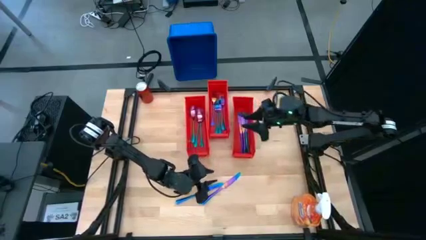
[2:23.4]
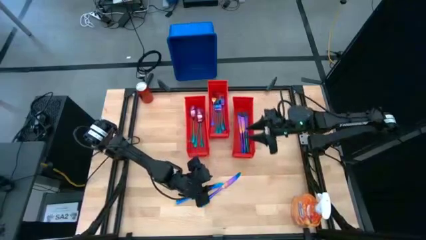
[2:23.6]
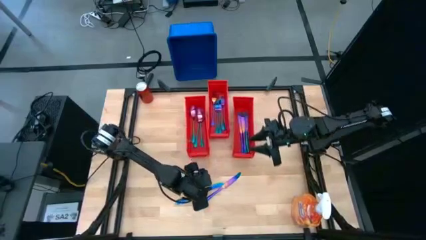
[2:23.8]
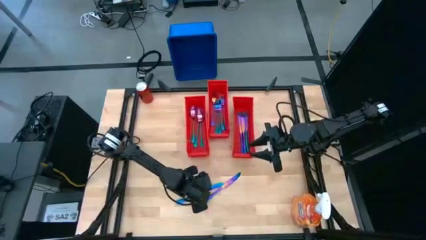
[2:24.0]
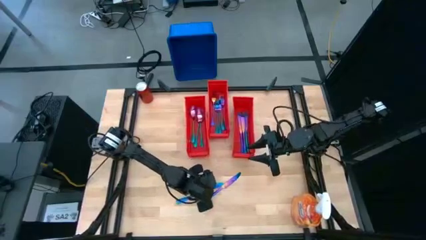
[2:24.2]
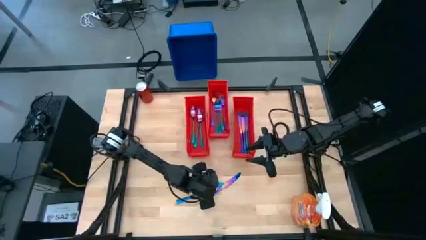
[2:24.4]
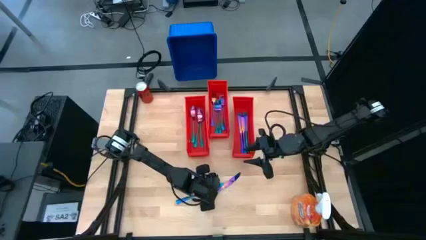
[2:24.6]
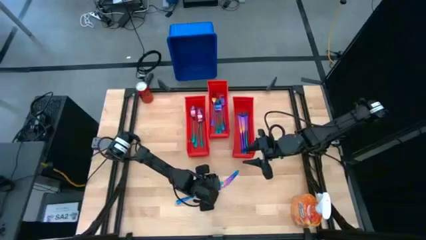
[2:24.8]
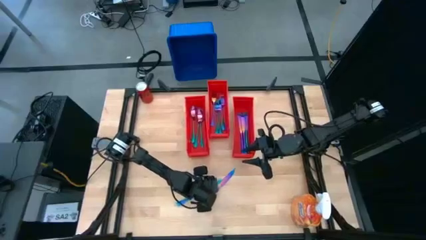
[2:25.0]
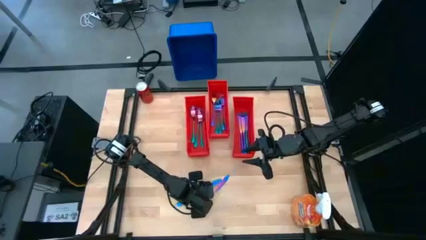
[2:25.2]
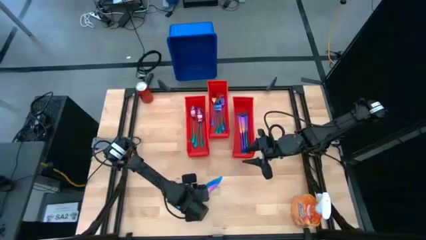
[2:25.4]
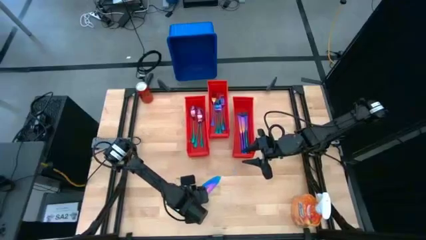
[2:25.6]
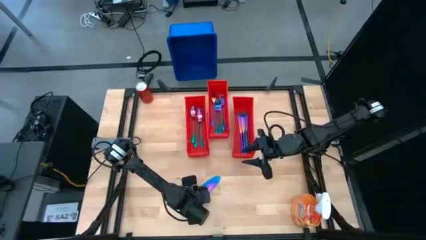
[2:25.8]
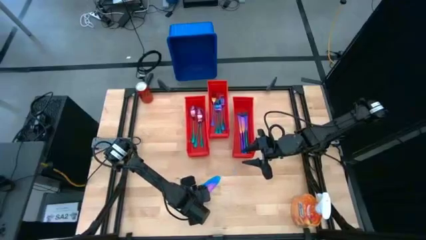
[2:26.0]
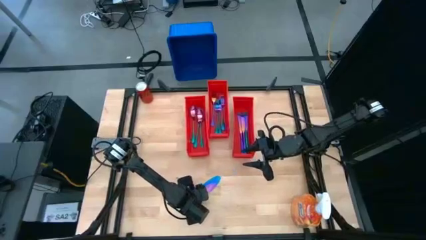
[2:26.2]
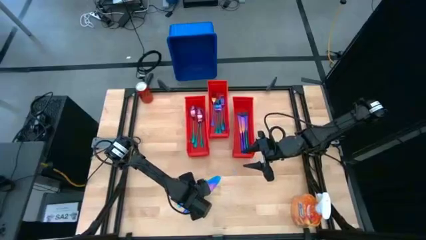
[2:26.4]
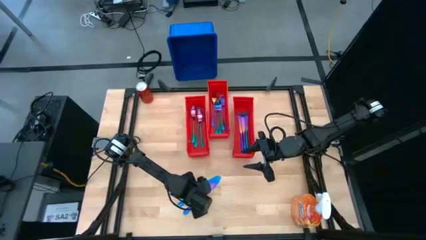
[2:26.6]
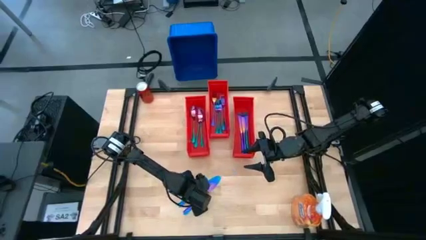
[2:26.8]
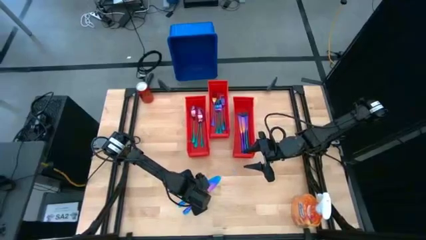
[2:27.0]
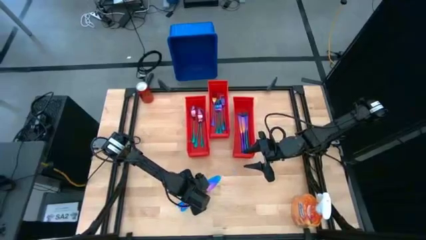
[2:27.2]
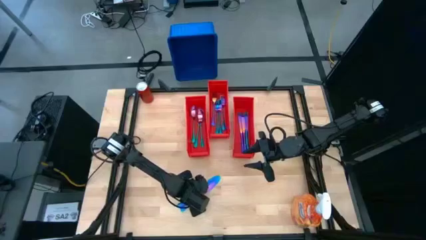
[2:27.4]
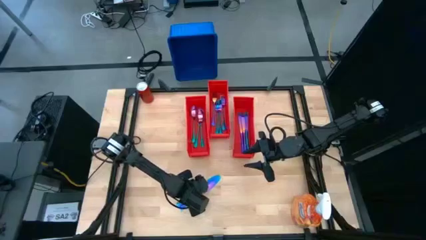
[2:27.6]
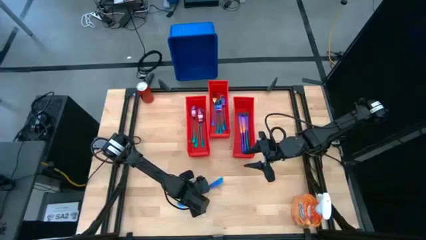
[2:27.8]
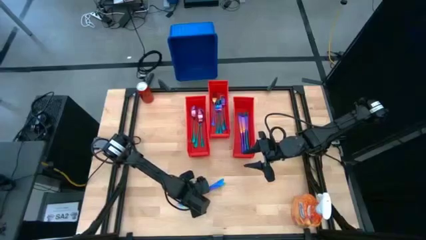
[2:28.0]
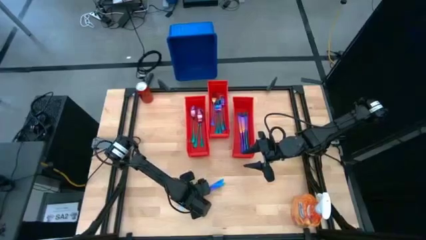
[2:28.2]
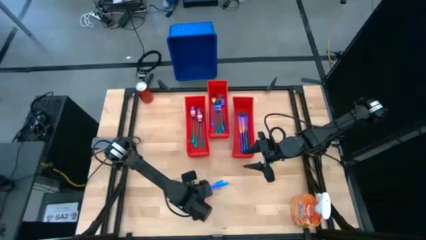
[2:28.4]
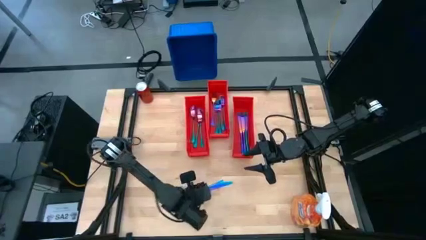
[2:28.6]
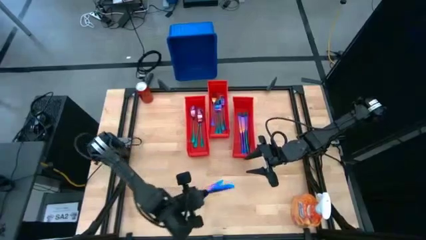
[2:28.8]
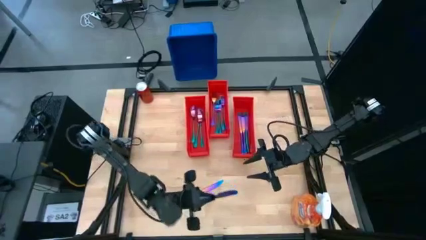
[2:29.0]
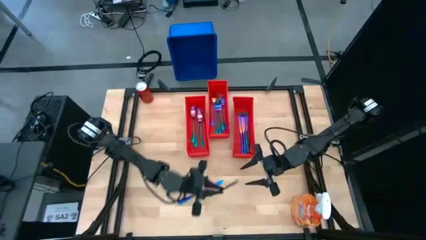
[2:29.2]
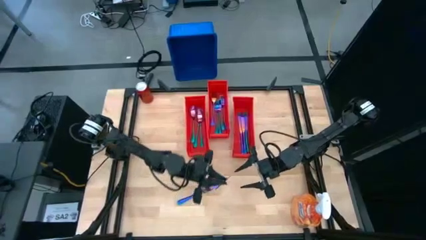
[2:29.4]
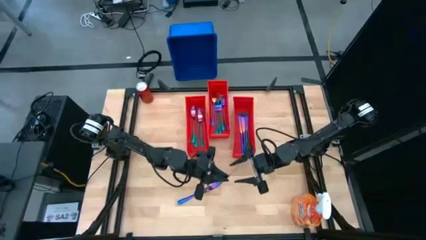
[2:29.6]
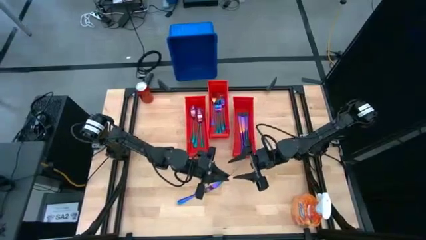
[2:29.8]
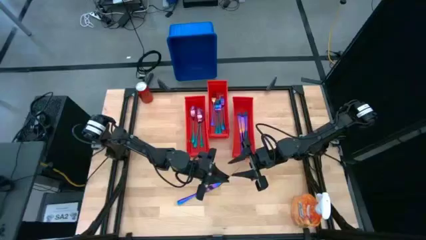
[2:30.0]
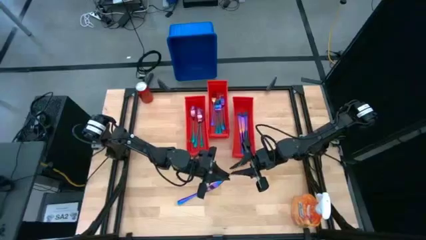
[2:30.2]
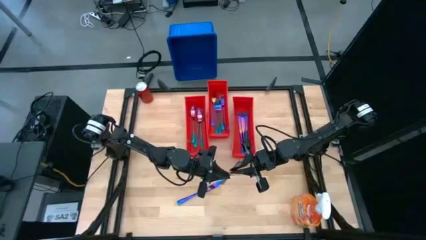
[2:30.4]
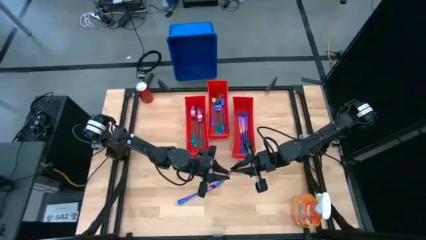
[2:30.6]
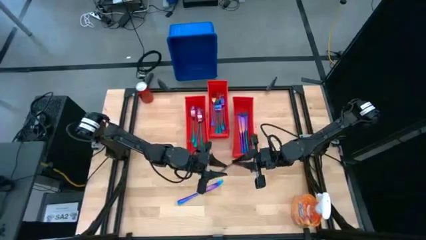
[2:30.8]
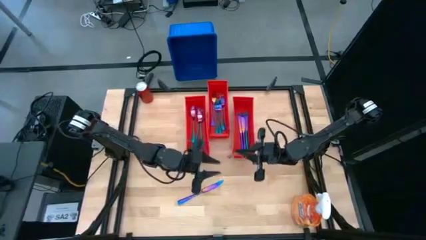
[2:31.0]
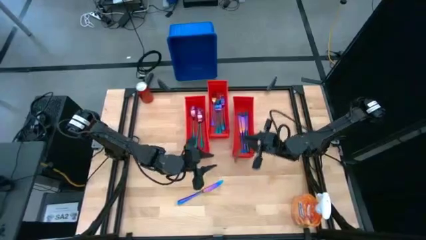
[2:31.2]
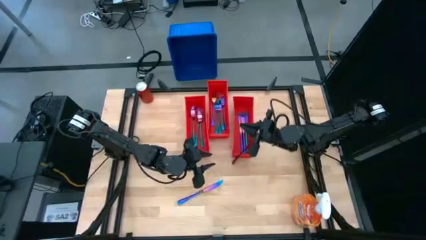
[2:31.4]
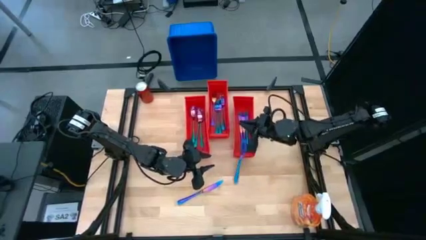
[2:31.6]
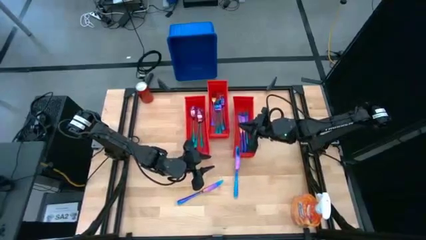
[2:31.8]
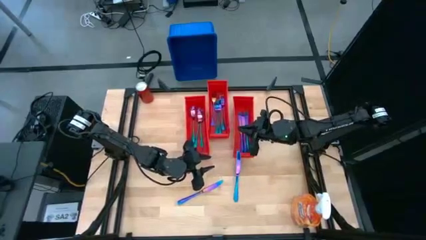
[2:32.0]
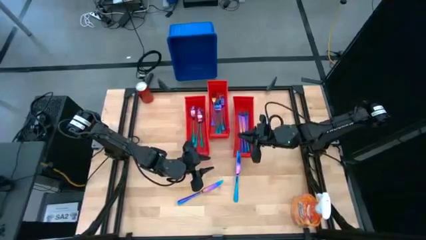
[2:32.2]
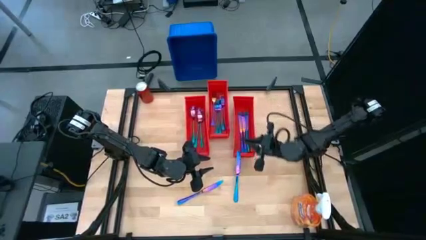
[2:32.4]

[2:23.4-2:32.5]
Task: Sort silverware
Put the iridescent knife into the right orange bin

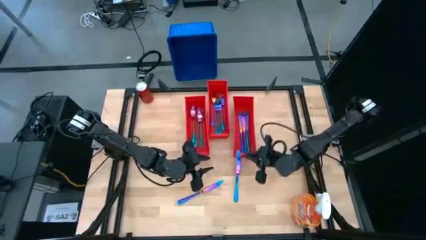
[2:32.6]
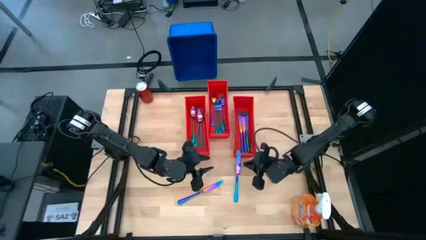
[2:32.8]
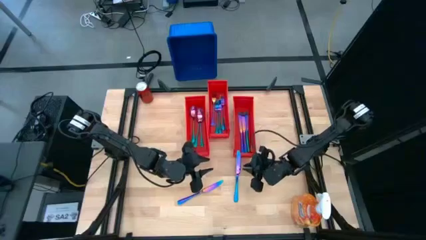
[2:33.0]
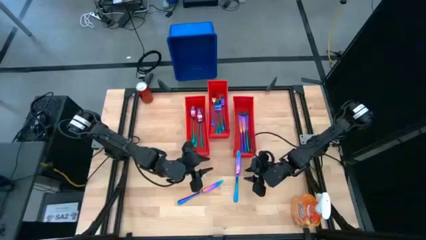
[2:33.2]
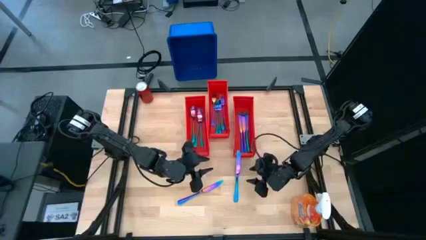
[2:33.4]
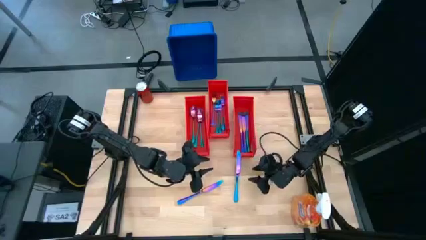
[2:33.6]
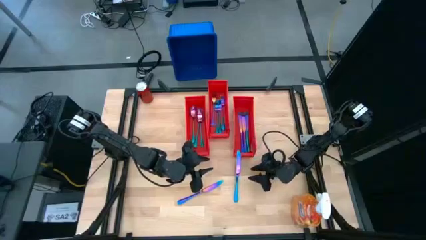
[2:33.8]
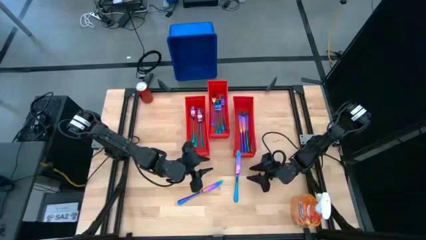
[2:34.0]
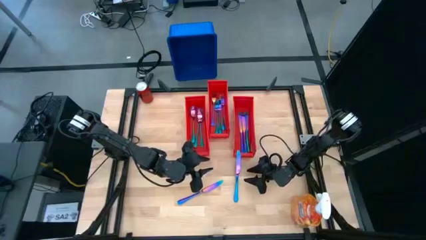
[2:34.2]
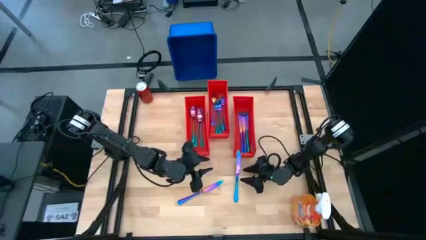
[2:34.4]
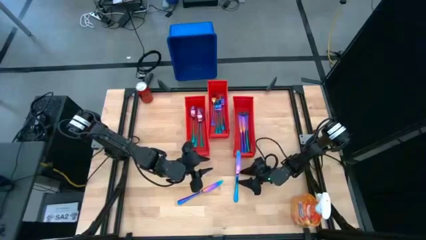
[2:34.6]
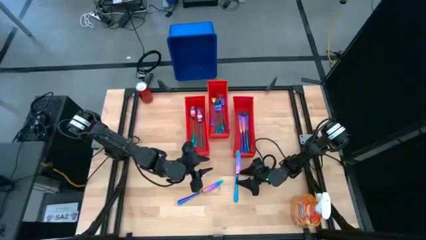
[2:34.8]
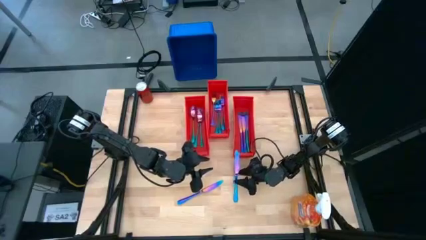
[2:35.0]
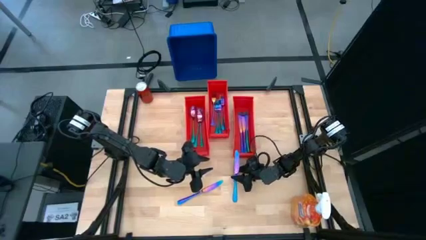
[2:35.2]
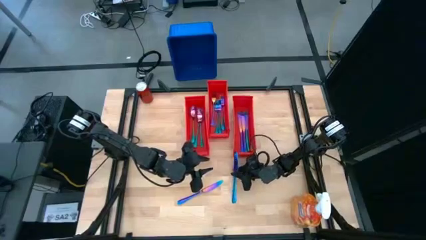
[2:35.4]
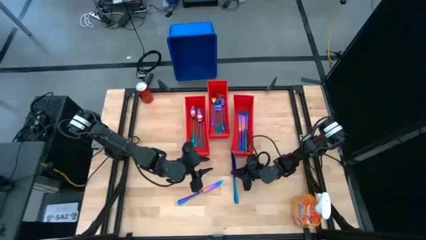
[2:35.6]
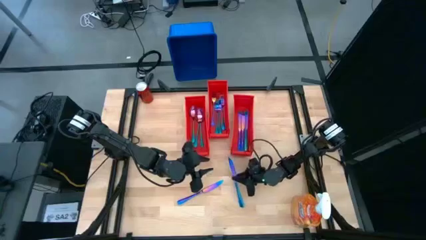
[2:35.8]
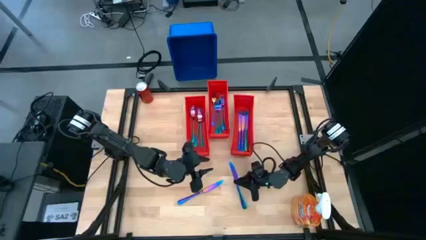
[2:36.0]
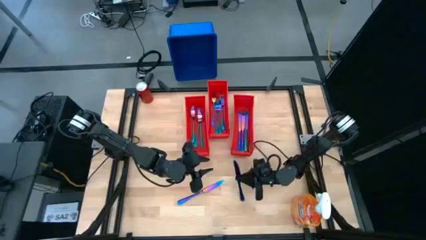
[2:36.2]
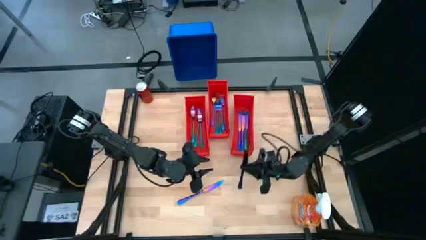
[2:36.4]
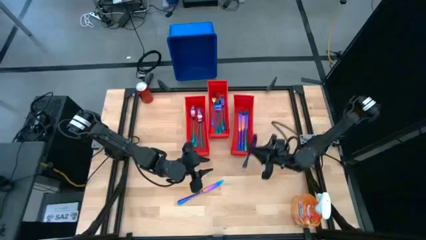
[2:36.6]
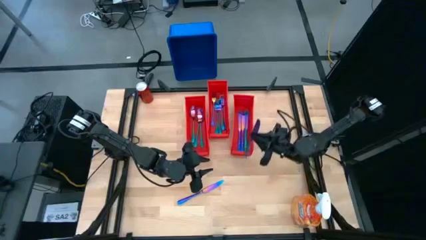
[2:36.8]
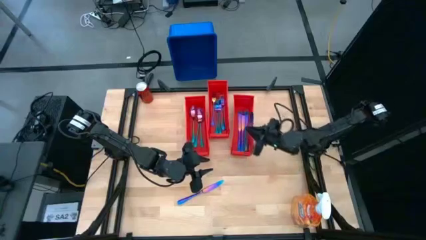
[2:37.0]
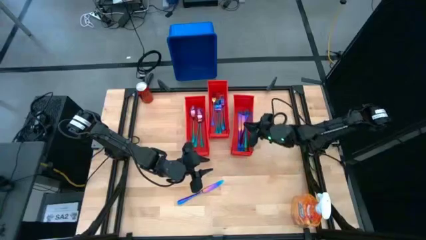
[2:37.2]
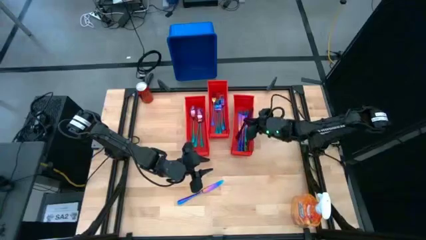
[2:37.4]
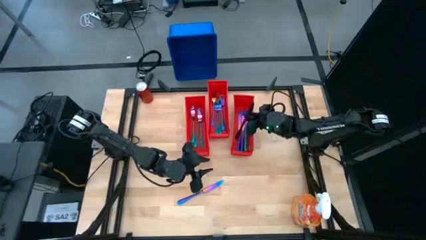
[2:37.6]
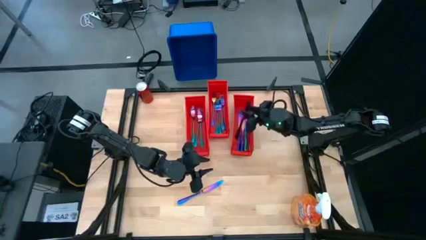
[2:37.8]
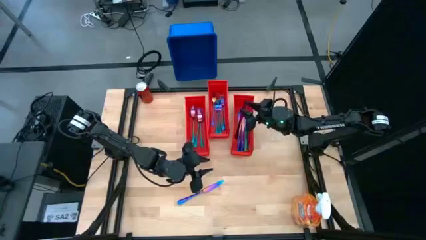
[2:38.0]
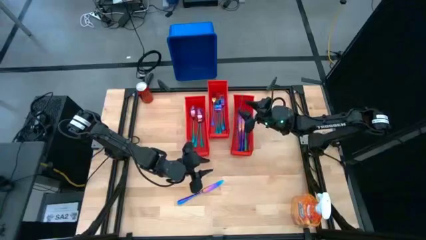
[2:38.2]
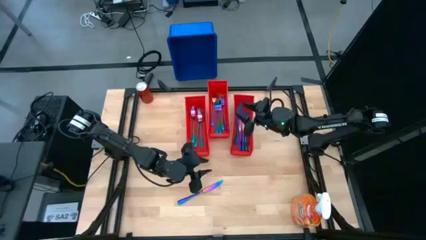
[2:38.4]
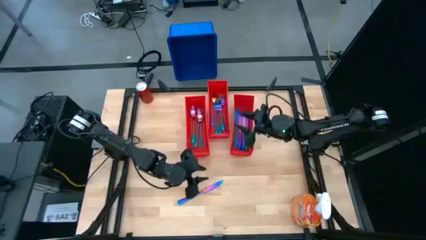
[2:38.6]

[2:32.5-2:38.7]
Put the iridescent knife into the right orange bin
